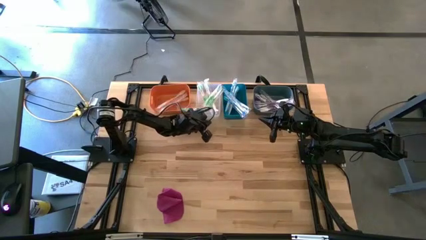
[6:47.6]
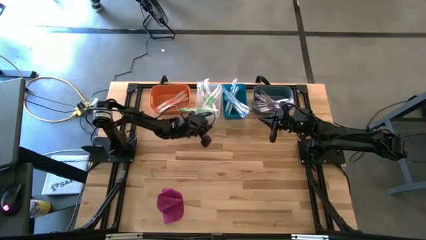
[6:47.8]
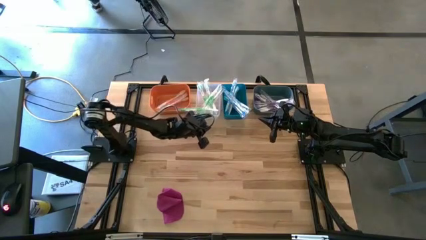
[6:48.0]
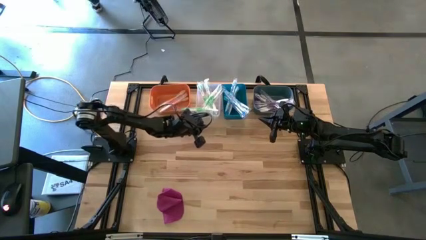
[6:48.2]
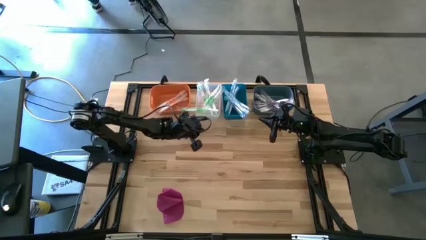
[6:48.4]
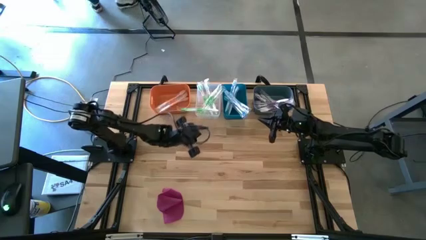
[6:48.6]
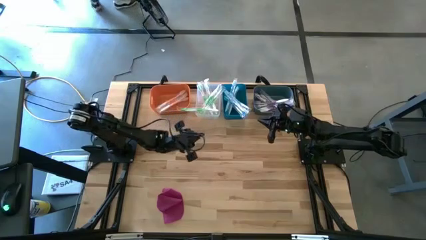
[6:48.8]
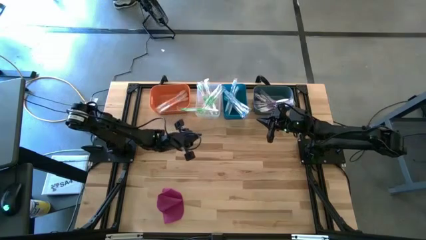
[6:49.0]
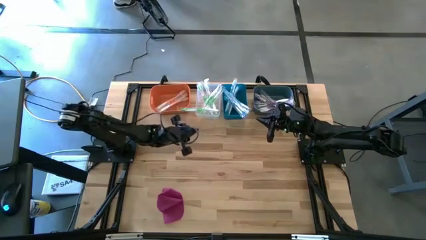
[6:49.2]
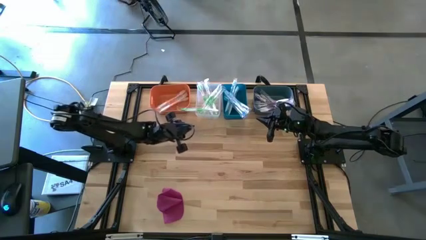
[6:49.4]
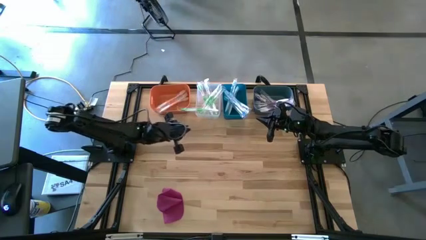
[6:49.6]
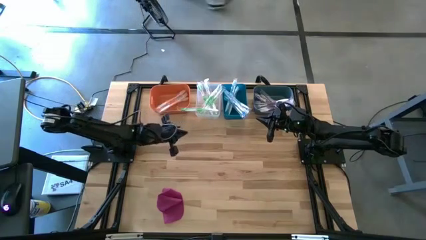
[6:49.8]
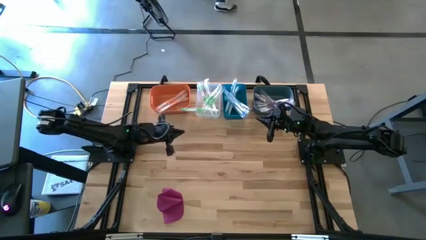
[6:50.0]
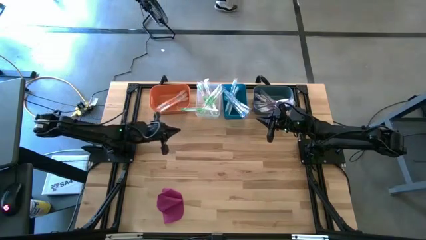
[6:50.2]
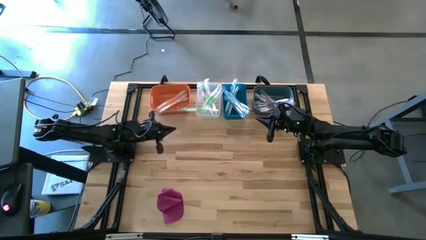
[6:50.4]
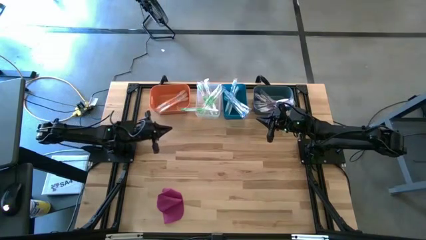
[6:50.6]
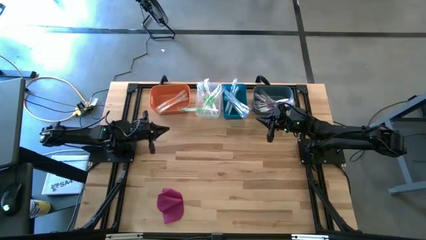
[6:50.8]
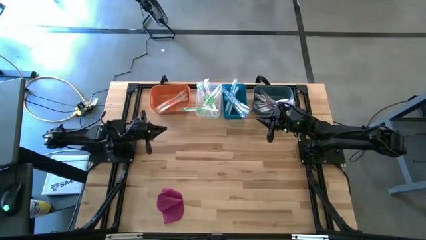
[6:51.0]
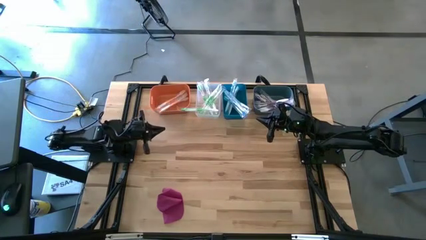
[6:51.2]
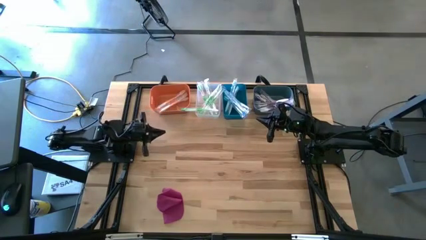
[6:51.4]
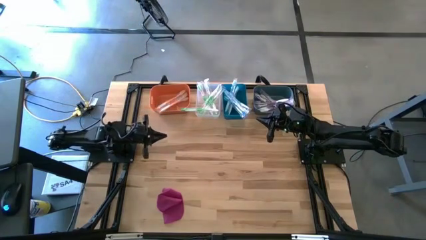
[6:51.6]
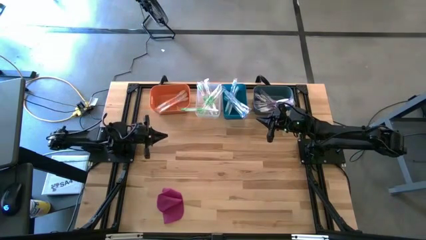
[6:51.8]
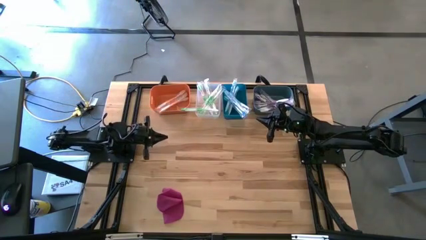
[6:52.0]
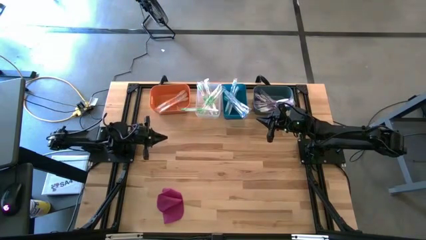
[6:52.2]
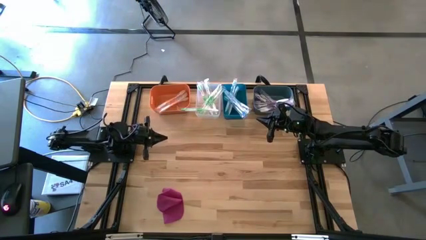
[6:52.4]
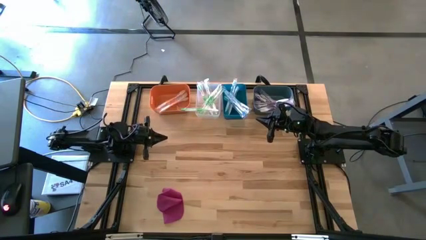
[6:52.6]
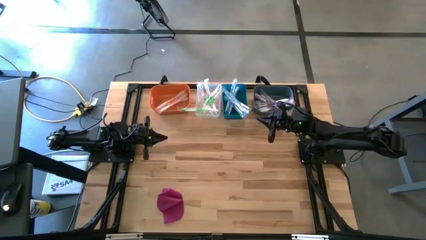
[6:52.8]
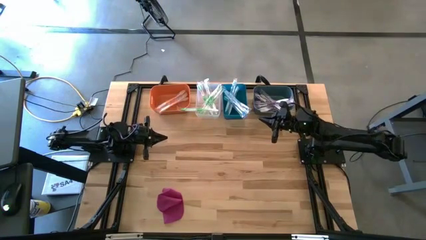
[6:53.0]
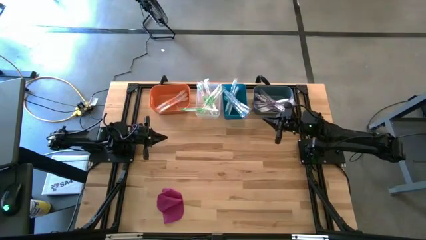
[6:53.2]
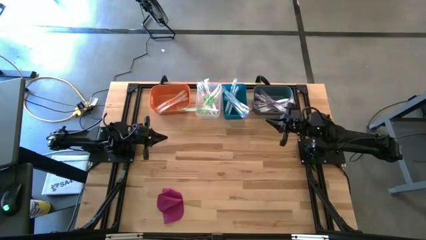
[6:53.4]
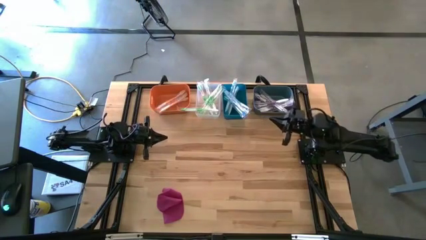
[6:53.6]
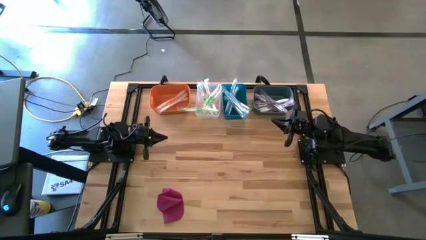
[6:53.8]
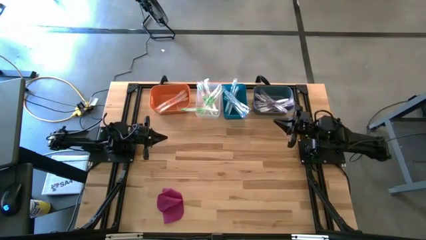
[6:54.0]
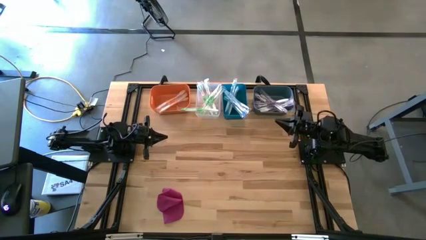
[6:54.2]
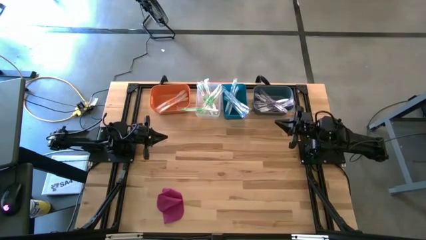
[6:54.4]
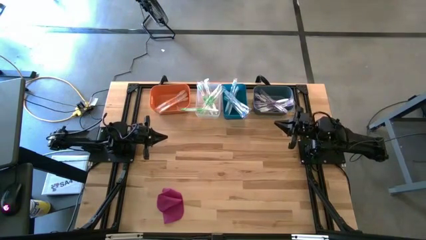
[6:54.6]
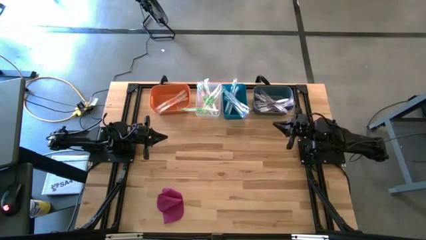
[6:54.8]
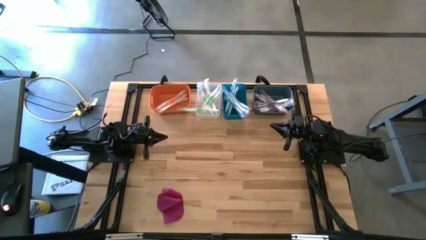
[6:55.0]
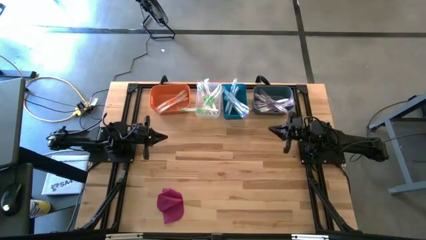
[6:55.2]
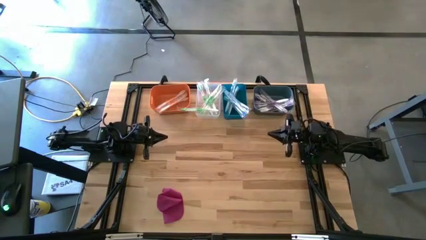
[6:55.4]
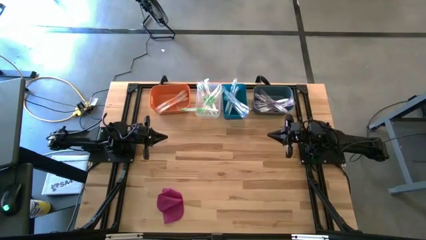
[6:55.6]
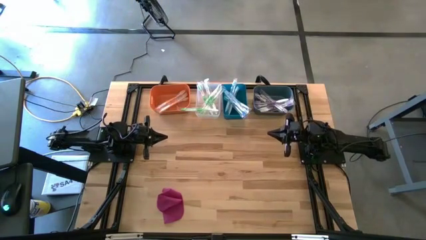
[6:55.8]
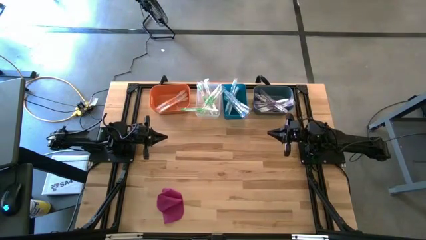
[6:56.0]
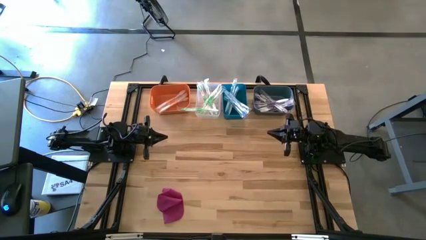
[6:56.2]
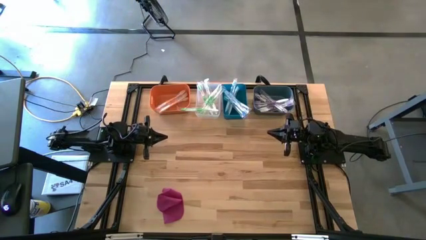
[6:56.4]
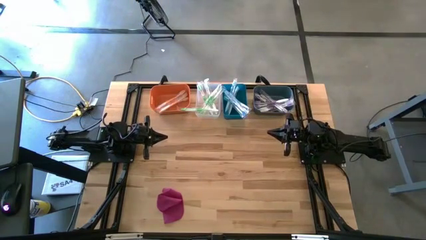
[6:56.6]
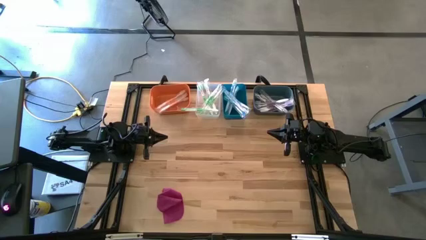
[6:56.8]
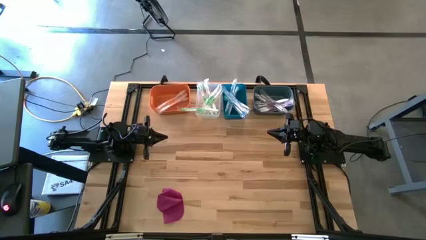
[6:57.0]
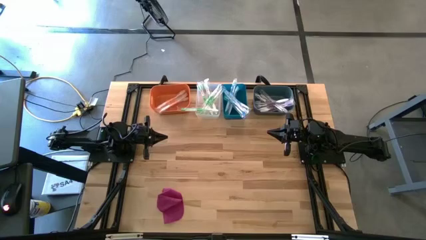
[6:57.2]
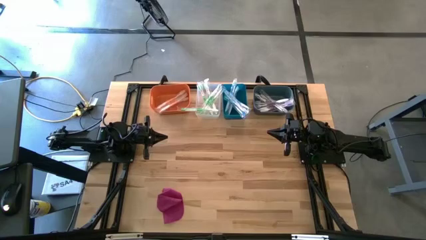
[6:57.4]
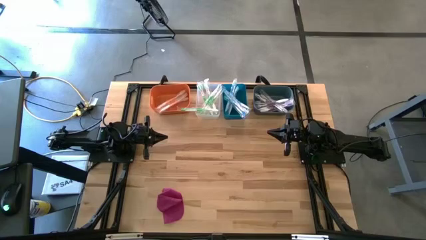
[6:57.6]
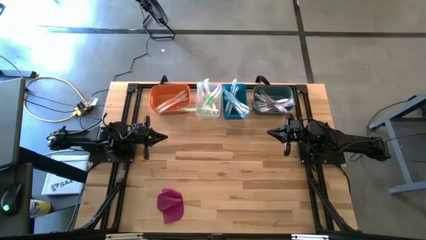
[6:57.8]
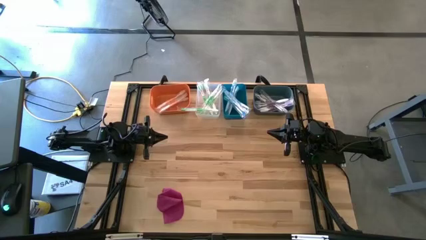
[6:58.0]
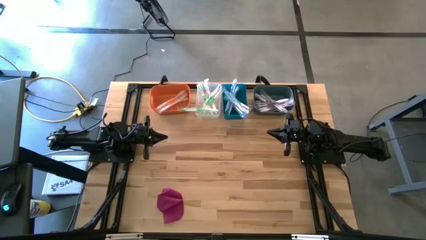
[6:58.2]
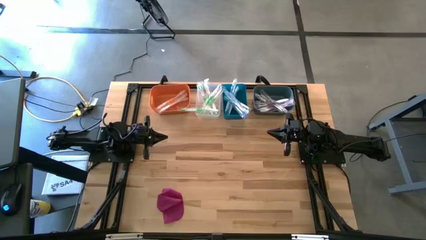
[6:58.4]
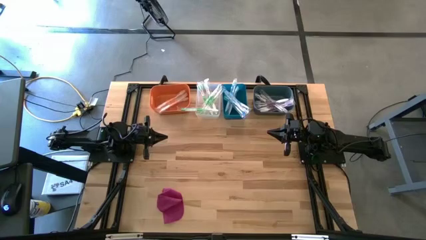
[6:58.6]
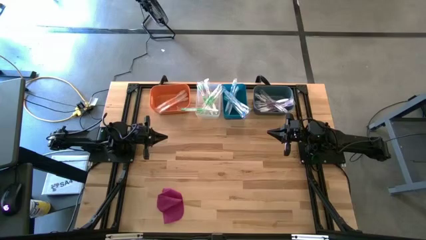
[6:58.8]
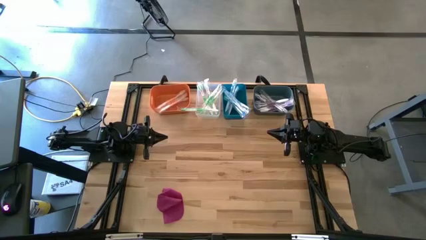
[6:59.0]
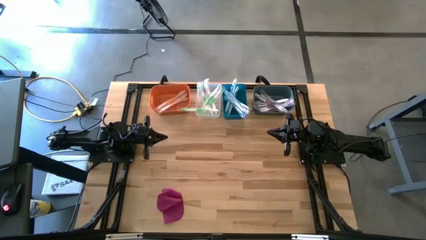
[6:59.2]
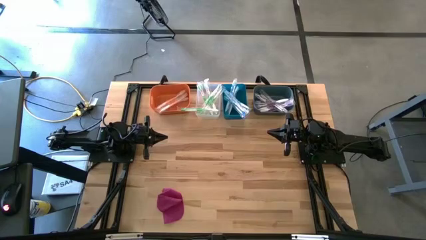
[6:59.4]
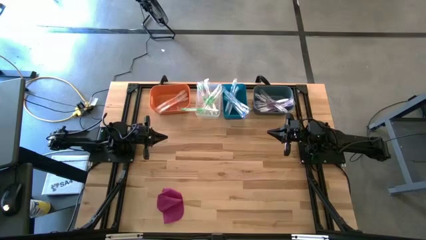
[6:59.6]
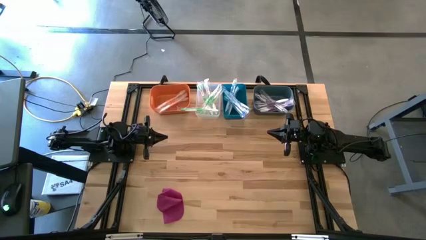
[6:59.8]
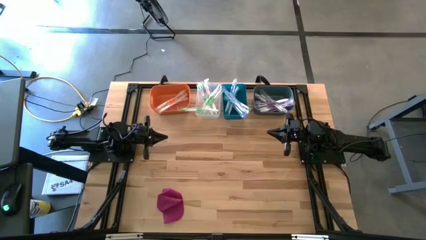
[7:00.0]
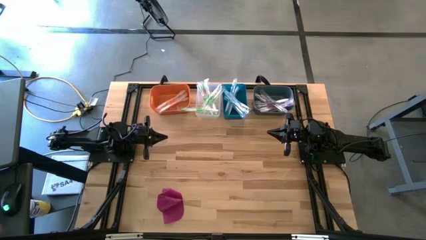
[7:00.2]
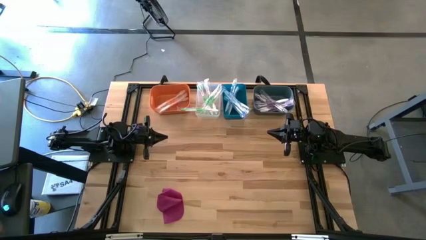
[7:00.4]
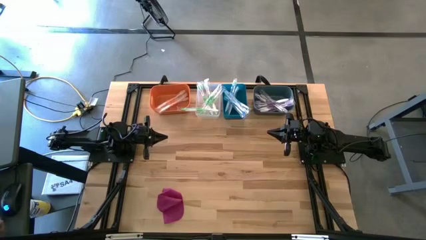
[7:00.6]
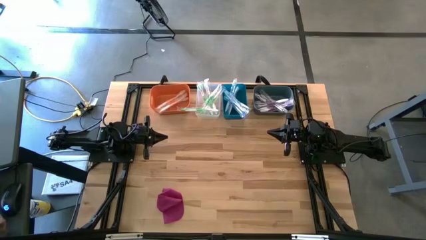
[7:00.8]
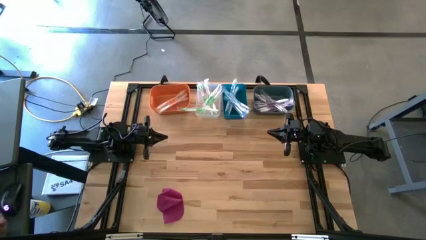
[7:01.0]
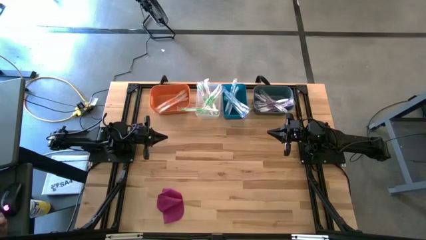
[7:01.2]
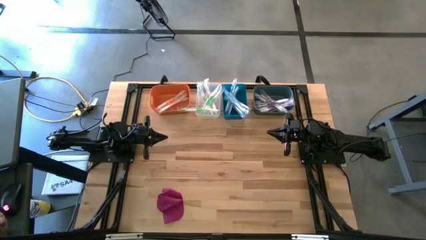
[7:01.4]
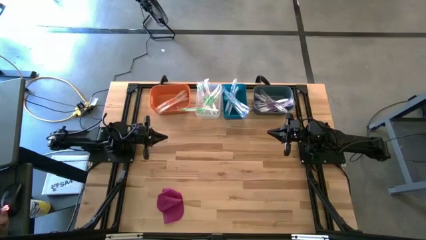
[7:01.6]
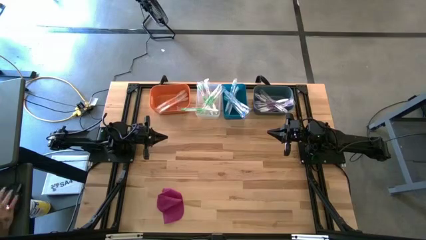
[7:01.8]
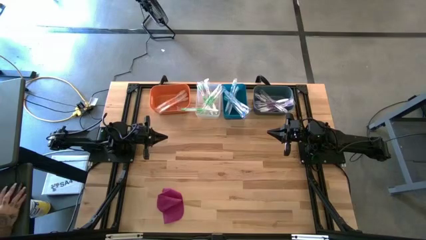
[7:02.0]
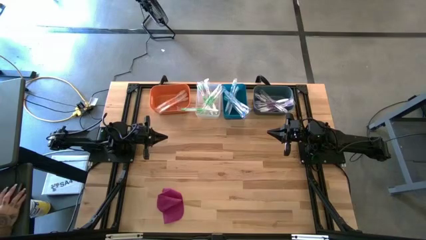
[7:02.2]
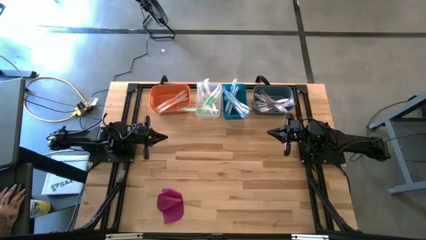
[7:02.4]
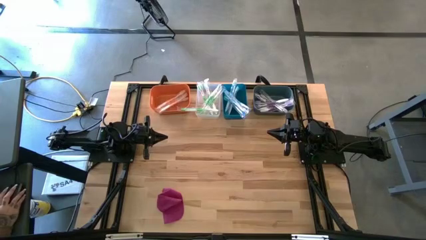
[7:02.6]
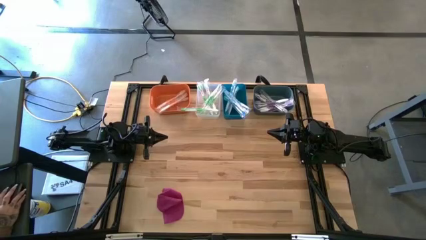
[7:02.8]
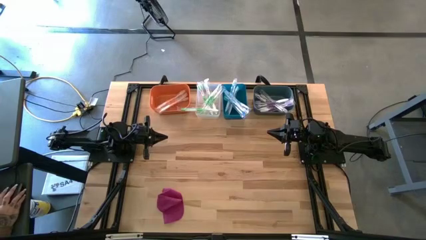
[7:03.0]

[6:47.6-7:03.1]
Task: Pick & Place Toothbrushes
Return to Home Position
